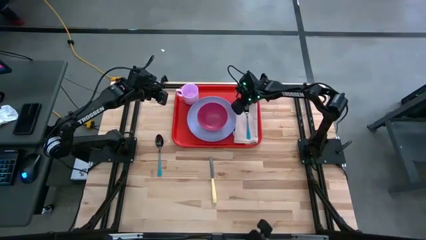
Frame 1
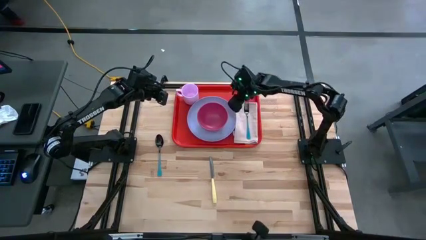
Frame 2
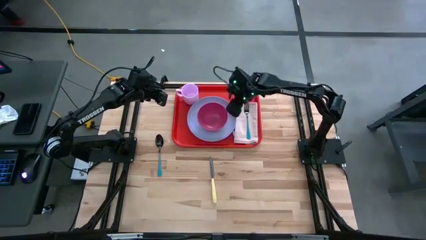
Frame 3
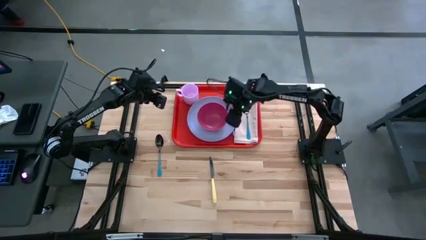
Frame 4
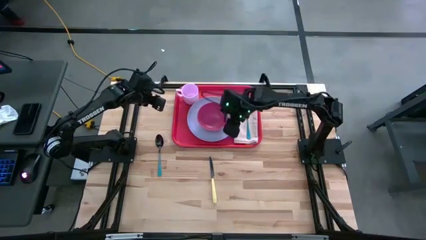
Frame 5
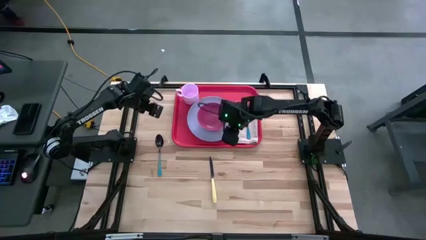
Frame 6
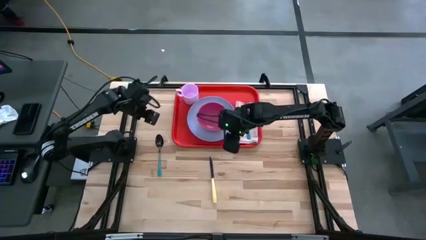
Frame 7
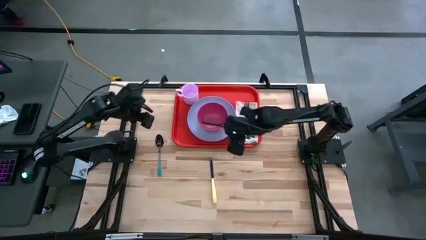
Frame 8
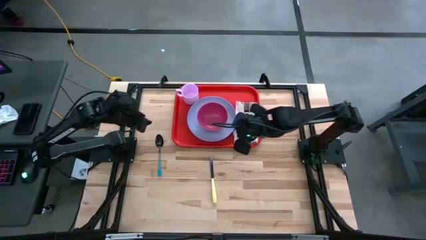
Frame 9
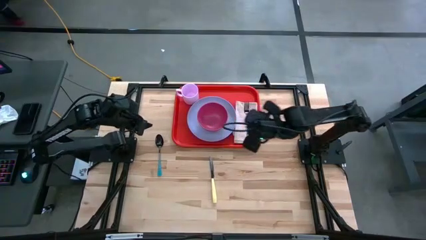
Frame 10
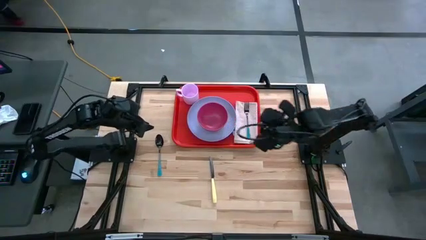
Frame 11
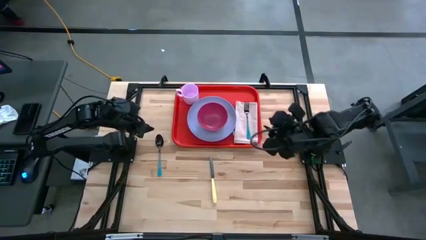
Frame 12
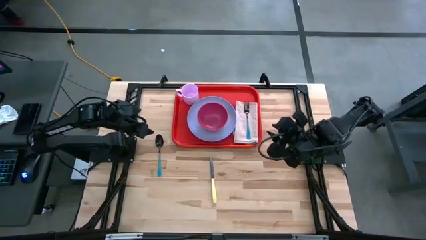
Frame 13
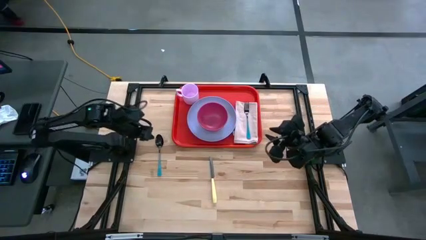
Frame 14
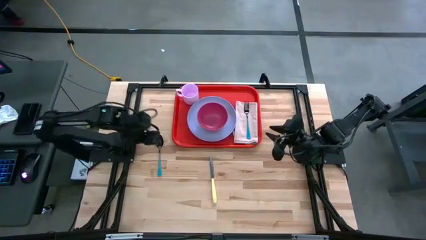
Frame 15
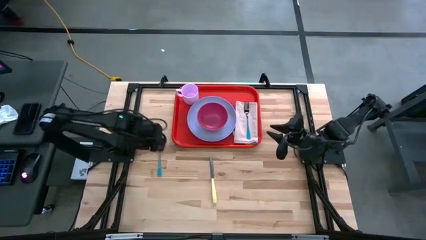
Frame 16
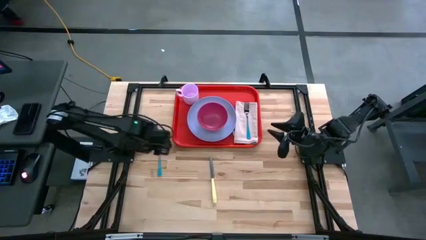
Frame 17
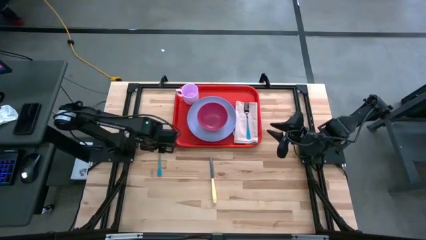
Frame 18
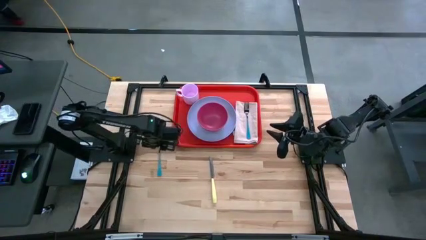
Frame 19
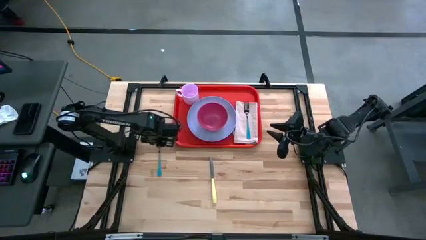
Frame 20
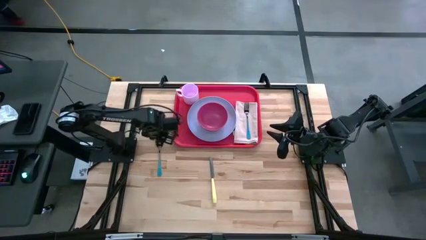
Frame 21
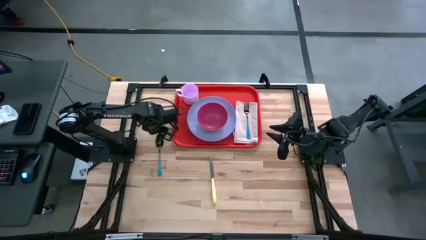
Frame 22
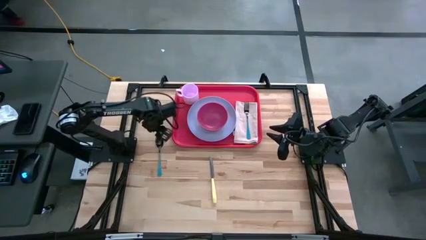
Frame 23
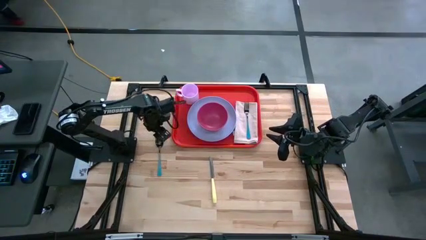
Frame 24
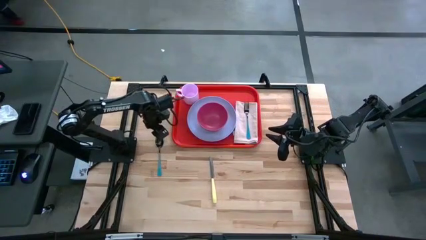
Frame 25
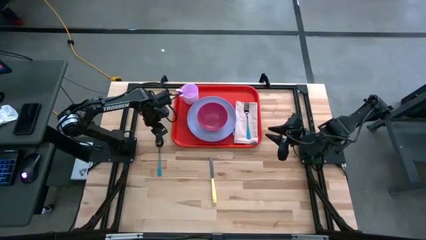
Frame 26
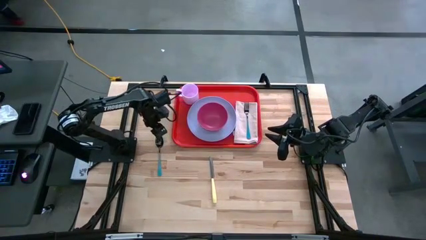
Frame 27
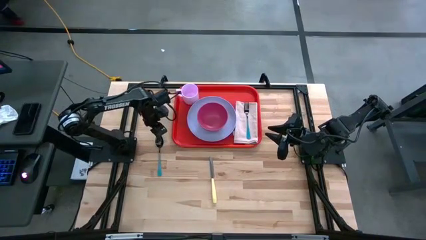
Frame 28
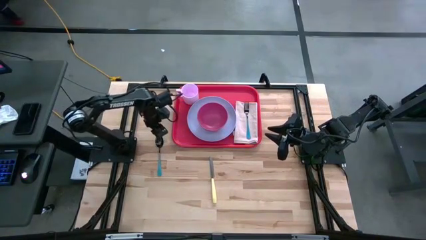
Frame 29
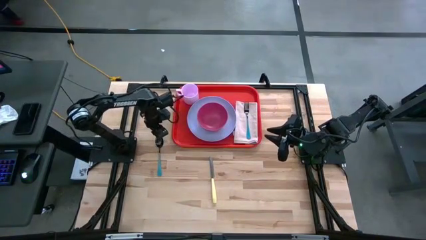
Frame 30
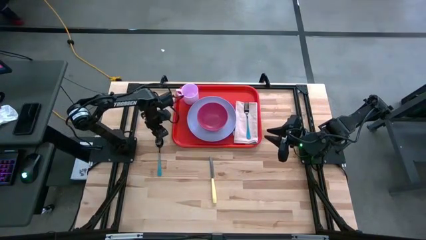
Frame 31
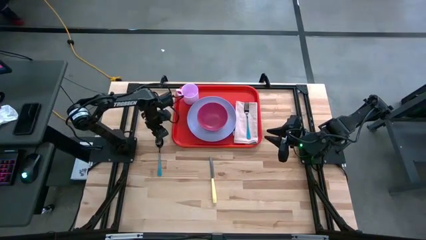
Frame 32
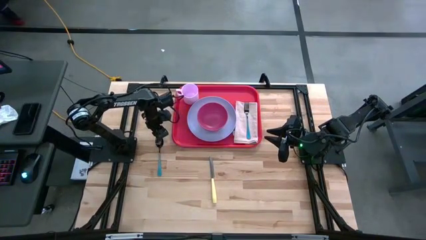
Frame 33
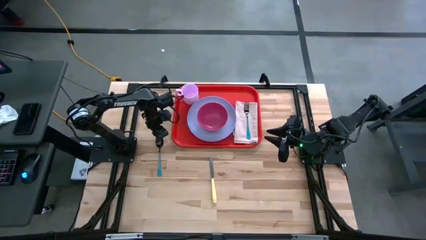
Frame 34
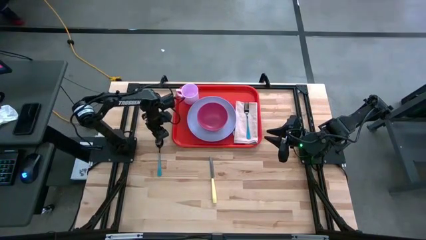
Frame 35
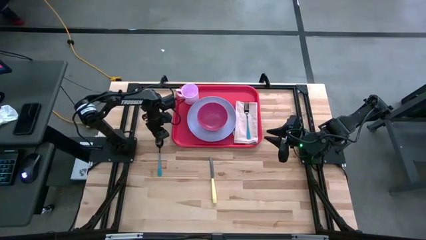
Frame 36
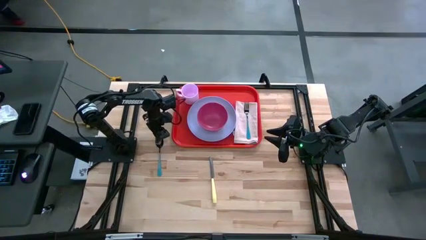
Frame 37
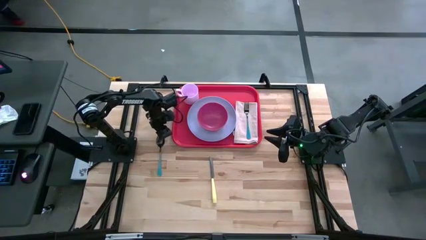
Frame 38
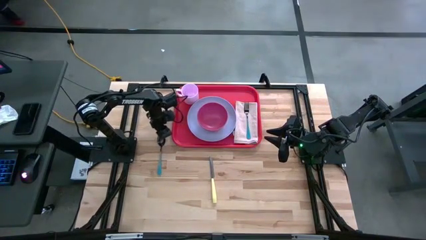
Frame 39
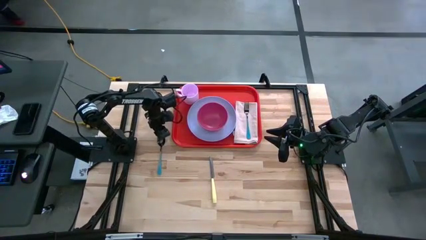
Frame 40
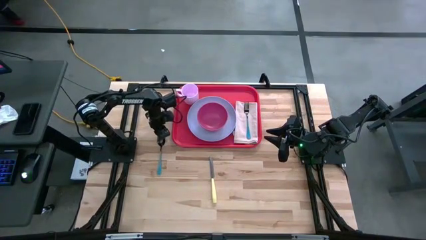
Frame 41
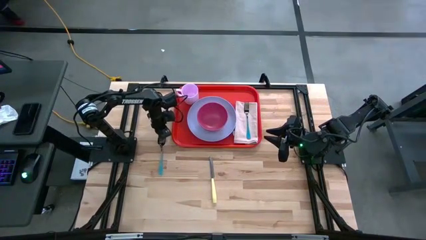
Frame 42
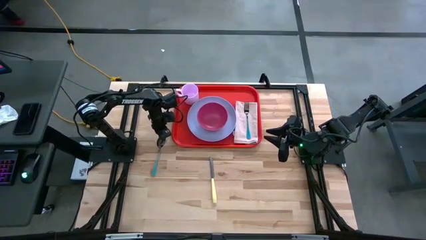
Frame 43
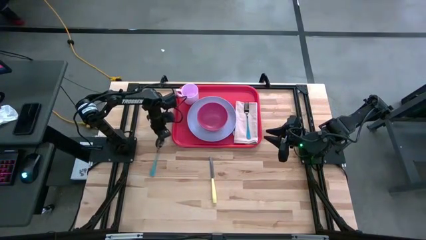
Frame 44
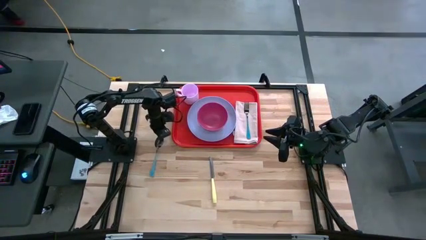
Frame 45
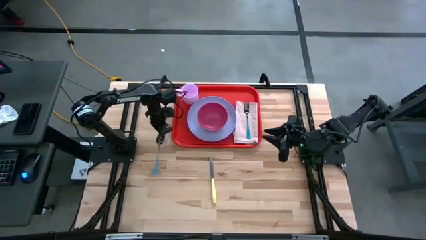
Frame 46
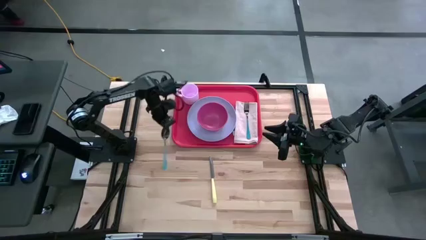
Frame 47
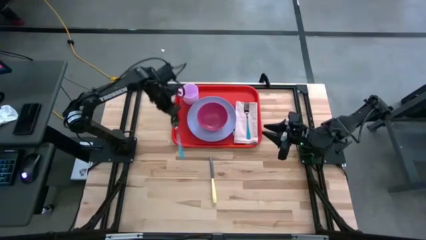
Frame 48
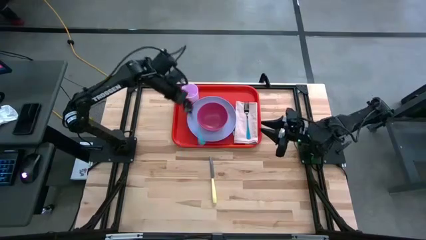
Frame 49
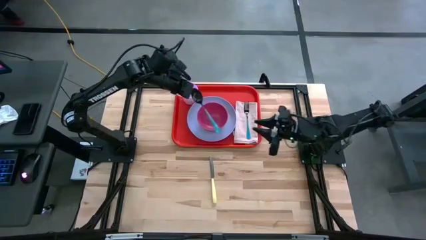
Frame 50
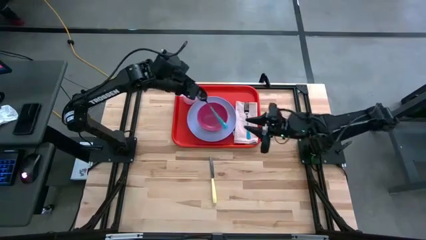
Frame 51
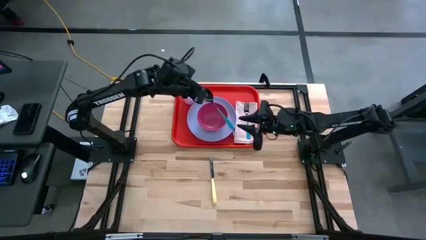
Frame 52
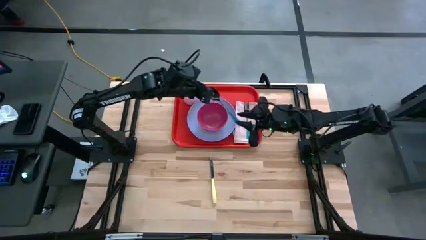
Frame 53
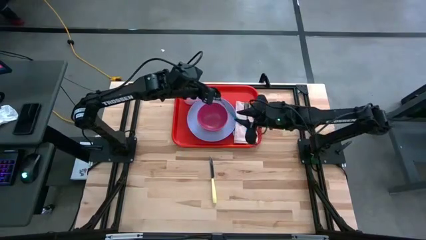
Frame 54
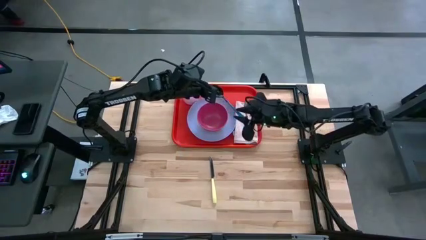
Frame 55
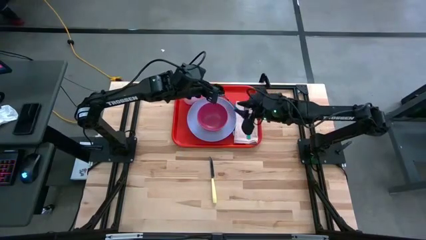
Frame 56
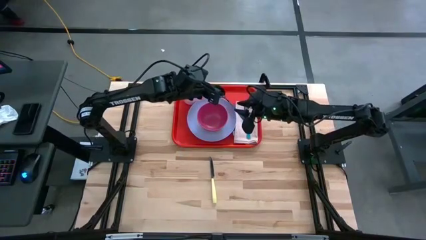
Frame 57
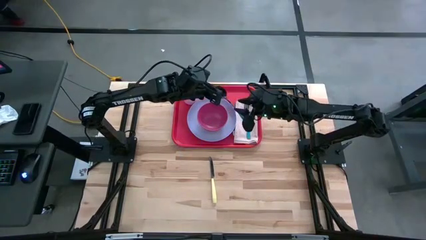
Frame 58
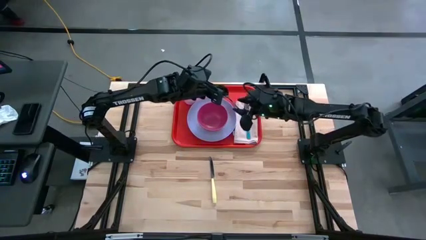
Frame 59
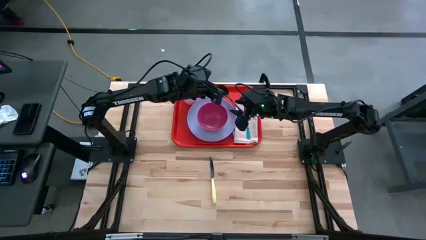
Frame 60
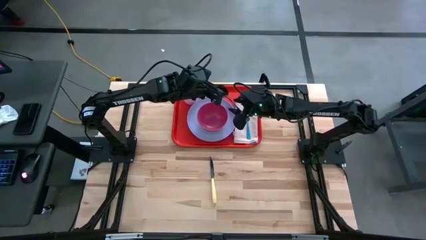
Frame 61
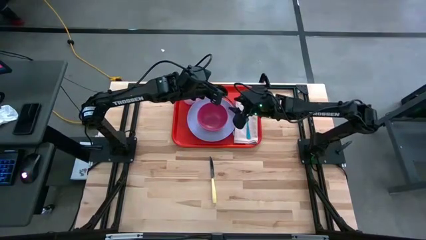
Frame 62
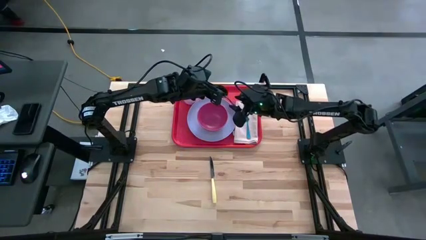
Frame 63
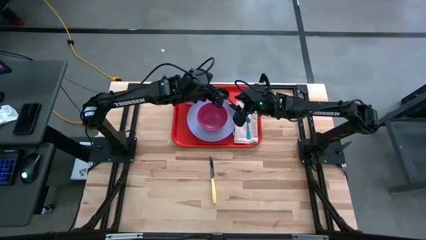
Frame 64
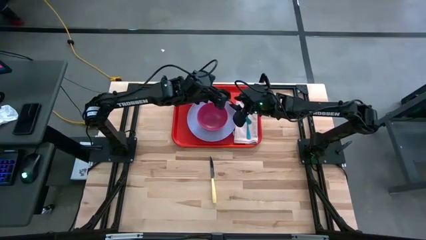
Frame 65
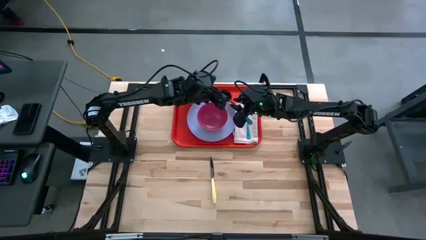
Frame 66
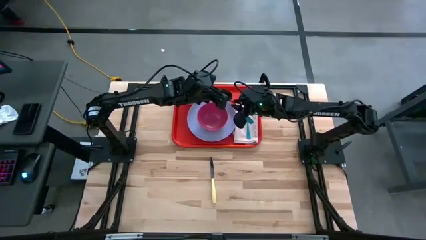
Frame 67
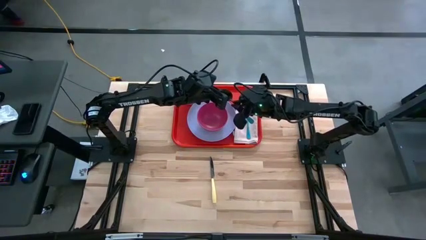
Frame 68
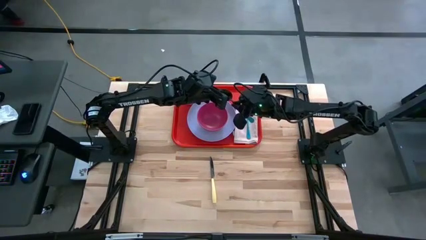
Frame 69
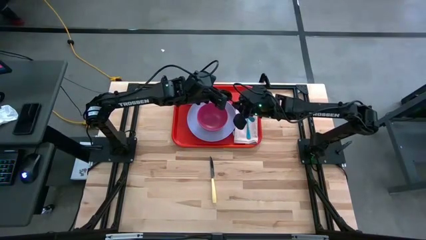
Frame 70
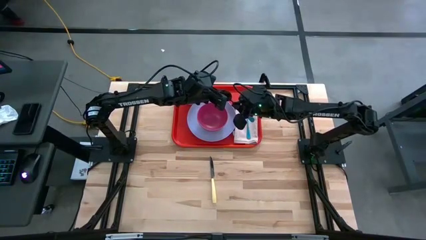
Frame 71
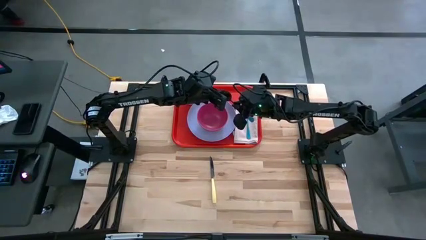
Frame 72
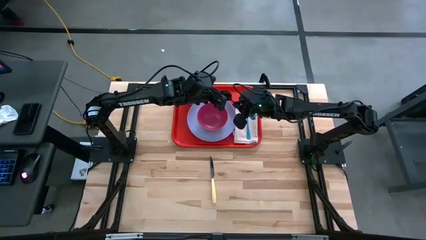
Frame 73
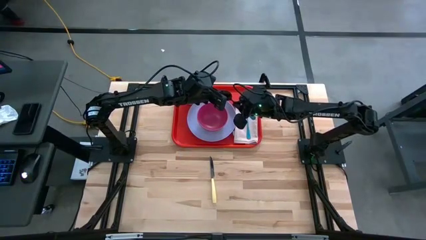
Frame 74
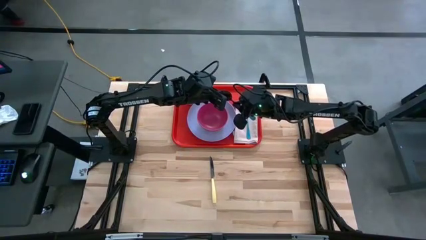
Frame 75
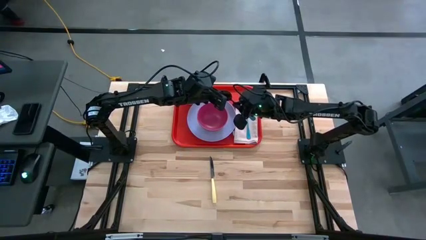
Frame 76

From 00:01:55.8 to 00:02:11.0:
Task: Set up tray
Put the blue spoon on the white napkin to the left of the blue fork
